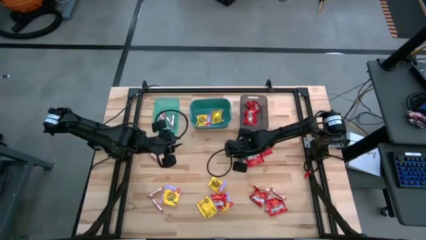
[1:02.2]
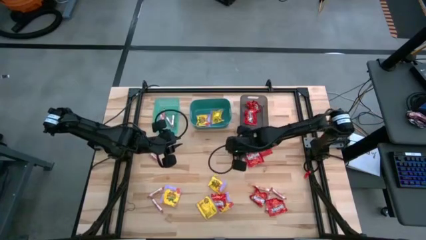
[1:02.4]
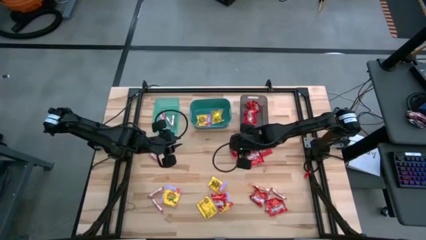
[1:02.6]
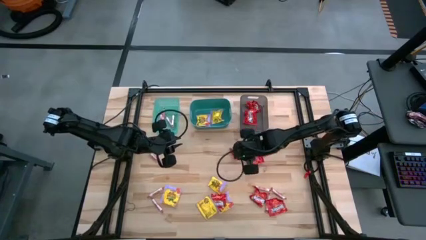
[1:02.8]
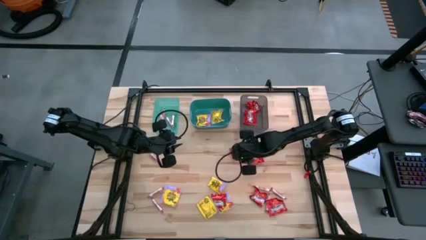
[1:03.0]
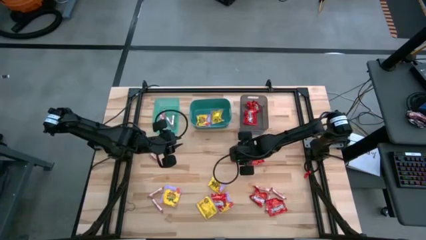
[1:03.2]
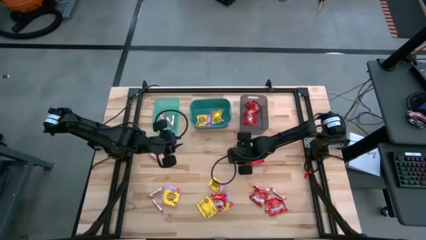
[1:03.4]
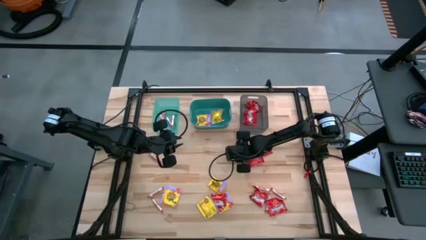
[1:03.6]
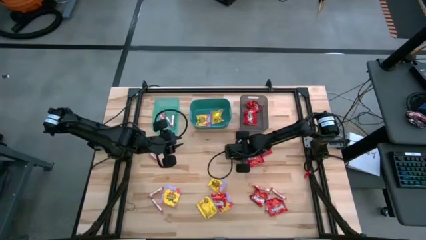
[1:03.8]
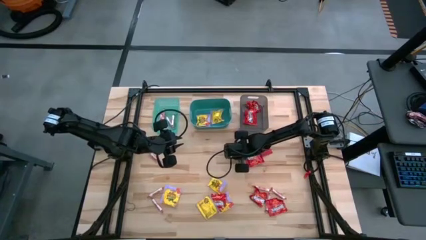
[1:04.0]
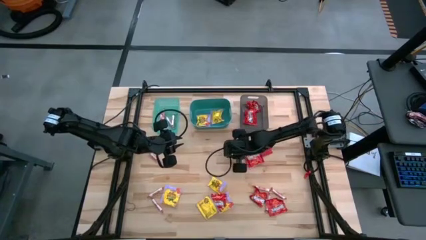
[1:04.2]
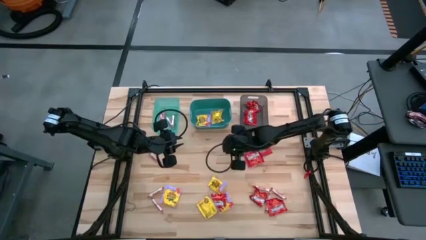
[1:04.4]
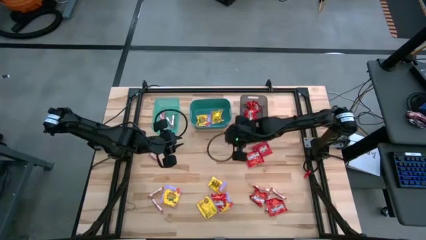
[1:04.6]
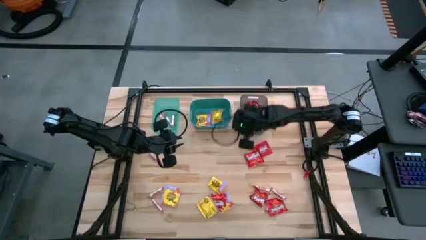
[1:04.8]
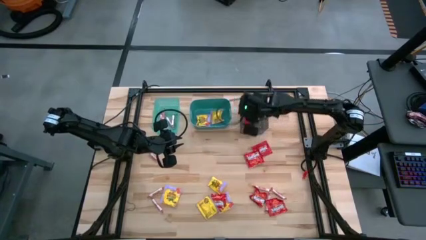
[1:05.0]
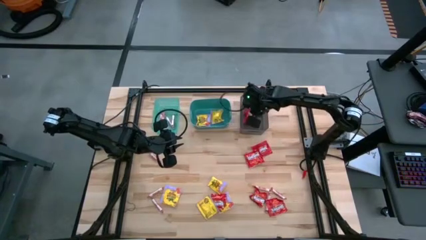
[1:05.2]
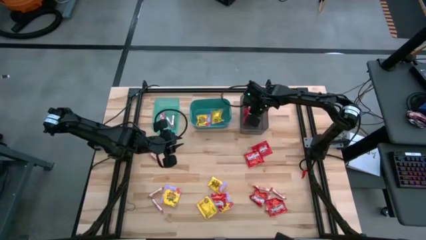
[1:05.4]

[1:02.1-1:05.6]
Task: Sort candy
Put the red candy into the black bin

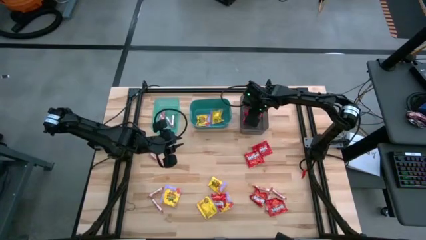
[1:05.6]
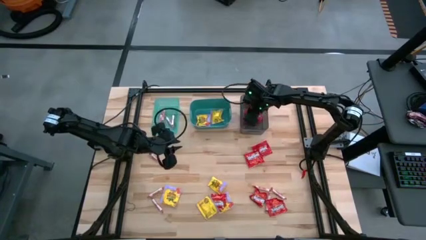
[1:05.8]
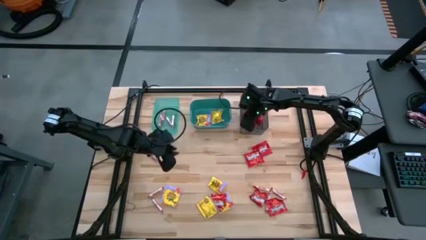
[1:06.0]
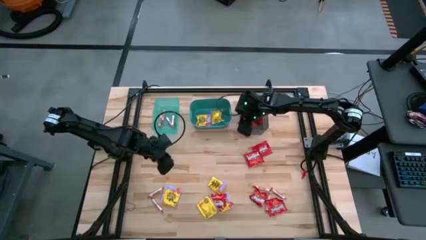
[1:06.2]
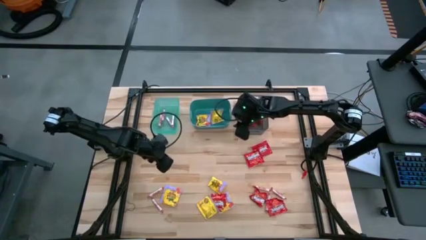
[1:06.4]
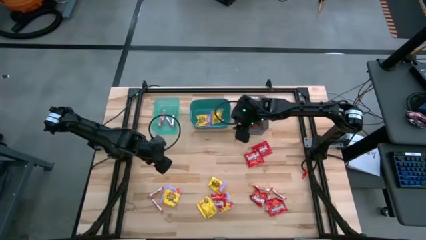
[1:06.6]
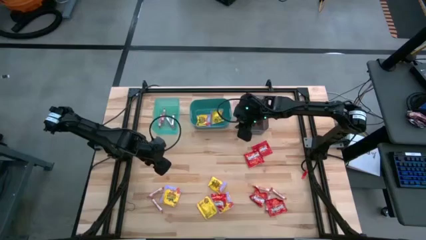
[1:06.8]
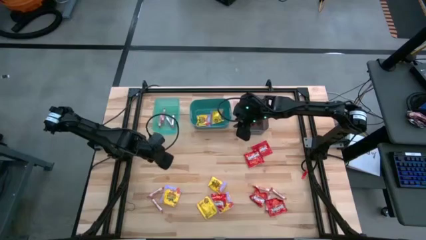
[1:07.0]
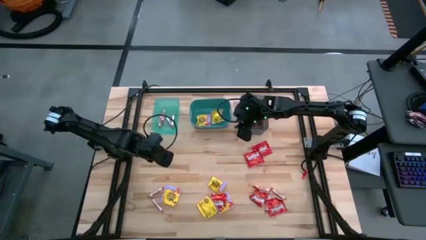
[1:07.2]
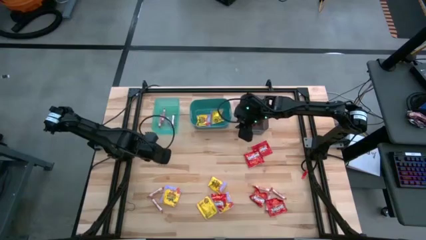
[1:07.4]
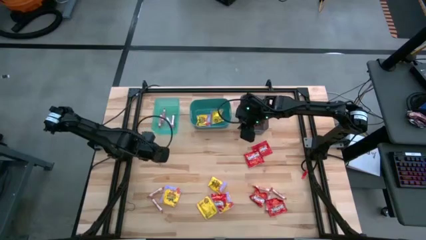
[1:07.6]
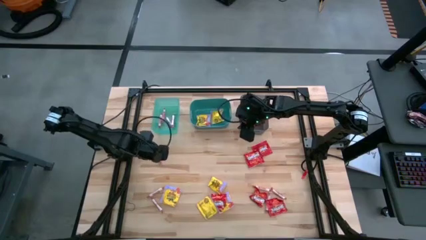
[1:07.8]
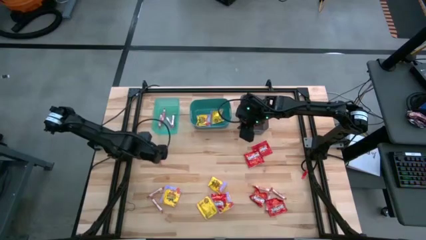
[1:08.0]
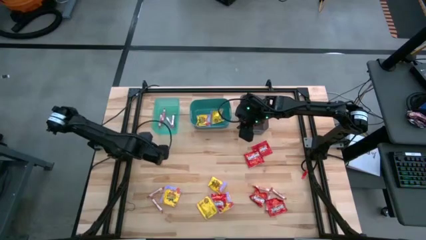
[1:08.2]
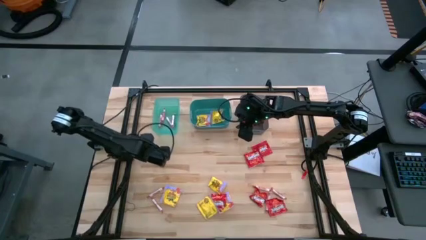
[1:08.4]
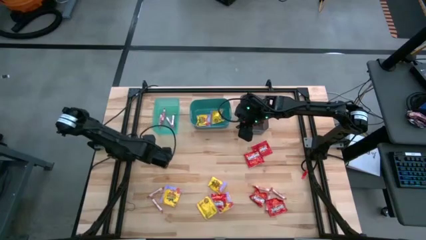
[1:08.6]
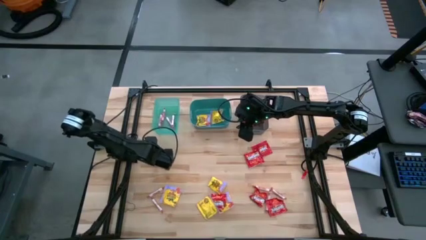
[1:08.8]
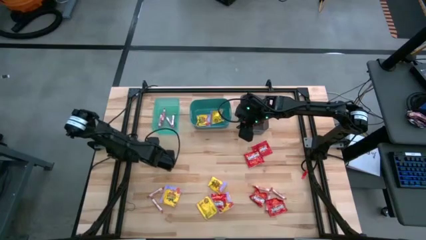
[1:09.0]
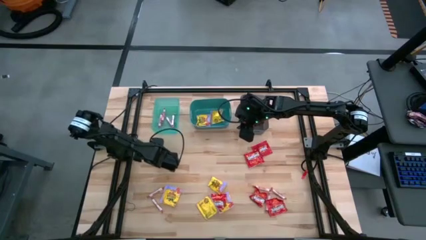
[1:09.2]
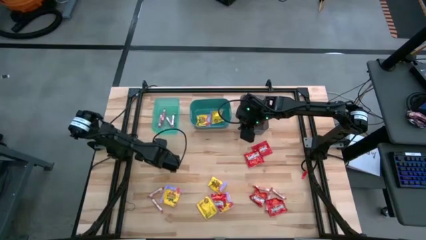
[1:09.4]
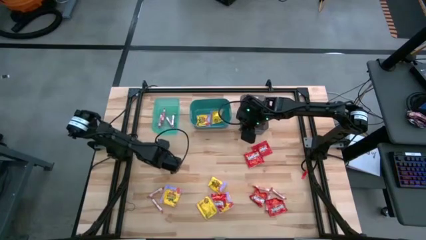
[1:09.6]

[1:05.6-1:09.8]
Put the white candy into the blue bin

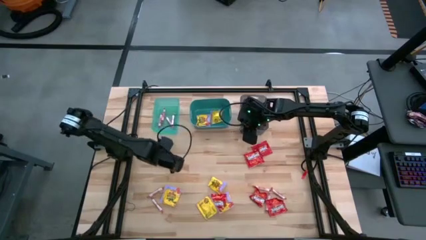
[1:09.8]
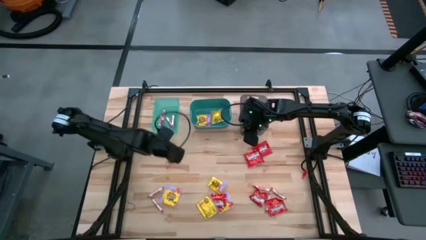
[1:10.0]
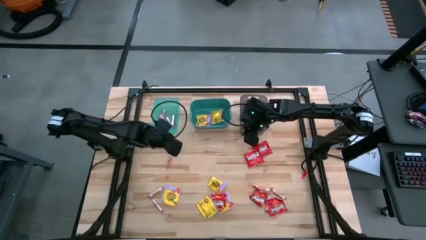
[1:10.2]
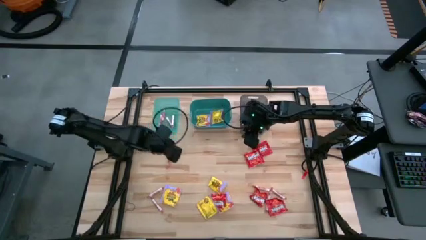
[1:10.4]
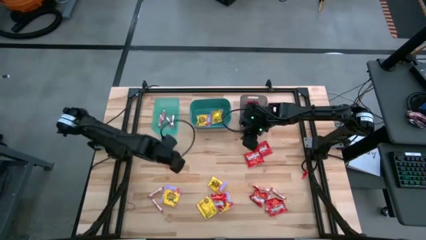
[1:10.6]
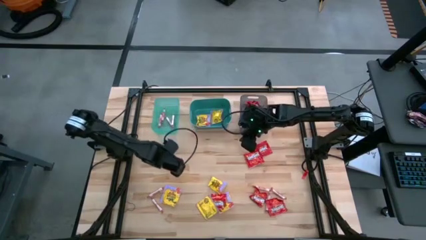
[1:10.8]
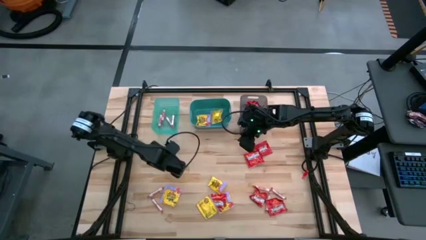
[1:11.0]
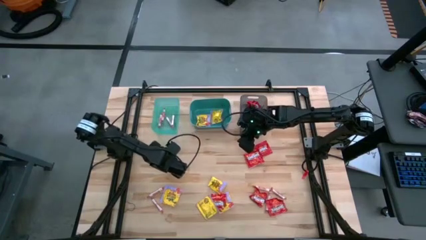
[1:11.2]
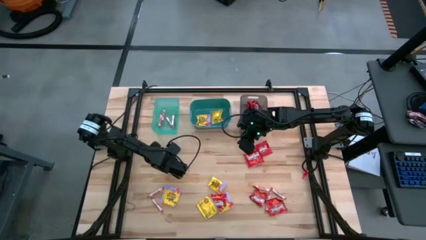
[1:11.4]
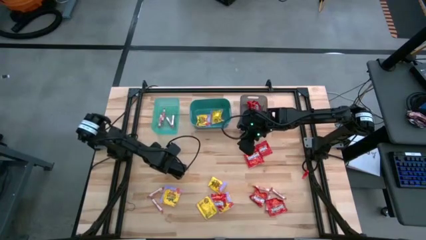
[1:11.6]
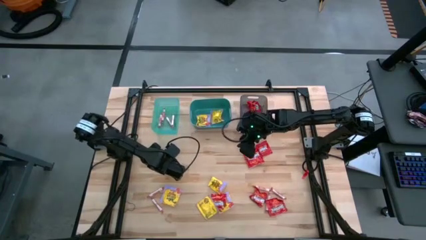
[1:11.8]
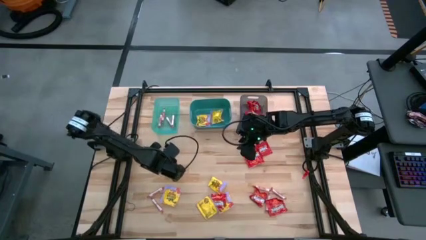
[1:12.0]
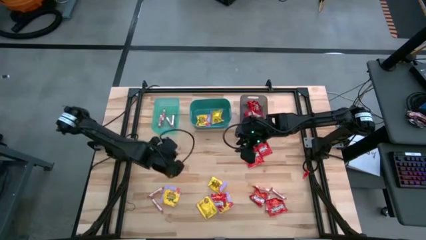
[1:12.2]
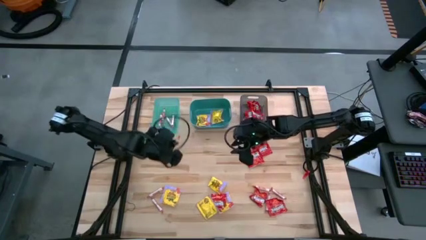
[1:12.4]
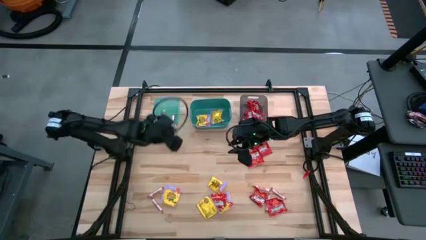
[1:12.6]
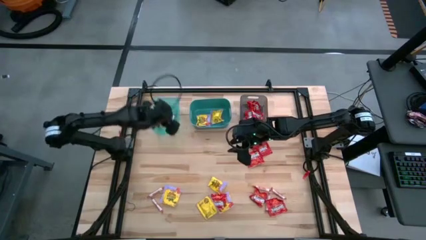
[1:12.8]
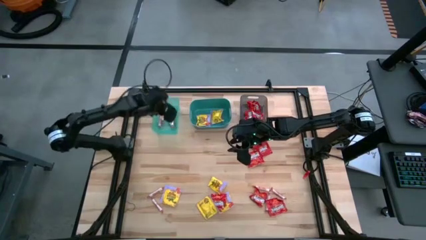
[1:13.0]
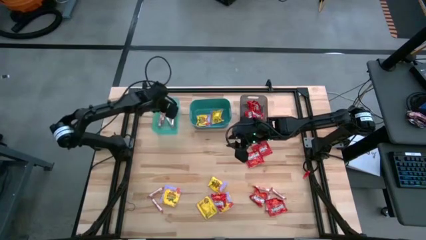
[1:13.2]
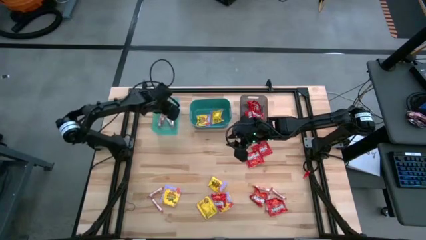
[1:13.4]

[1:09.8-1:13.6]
Put the white candy into the blue bin

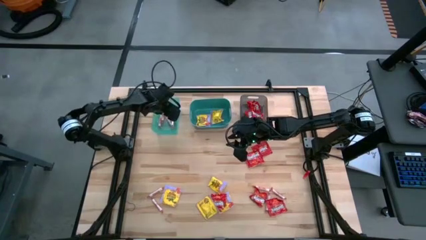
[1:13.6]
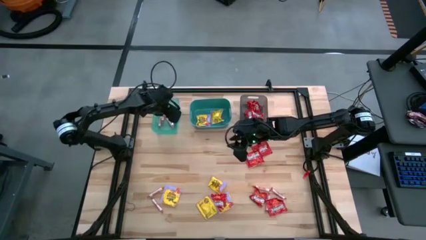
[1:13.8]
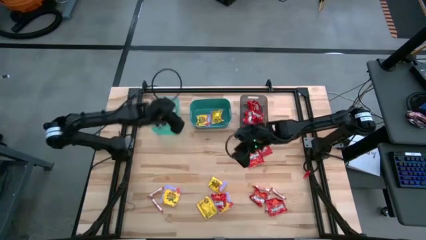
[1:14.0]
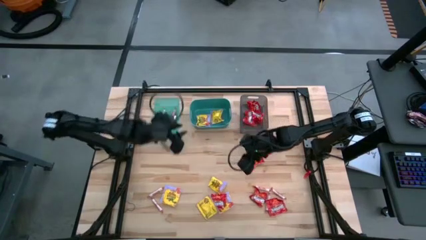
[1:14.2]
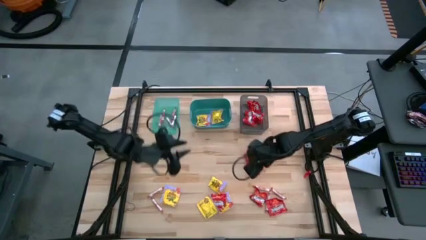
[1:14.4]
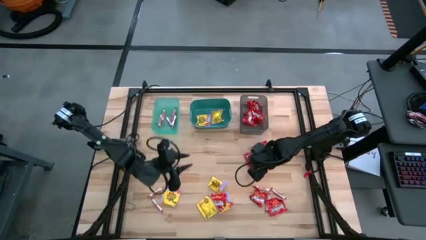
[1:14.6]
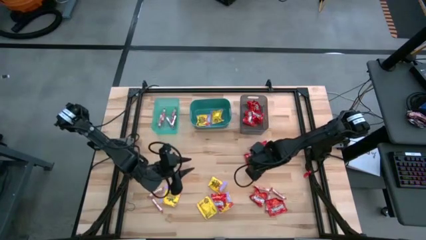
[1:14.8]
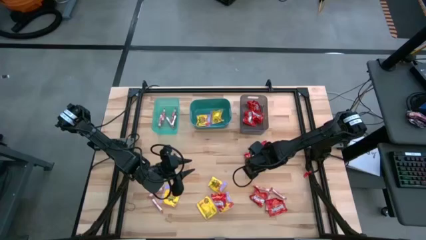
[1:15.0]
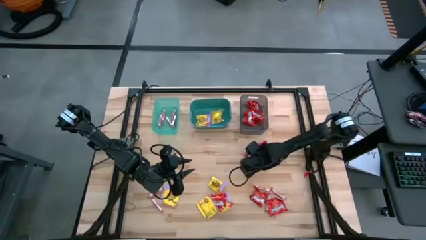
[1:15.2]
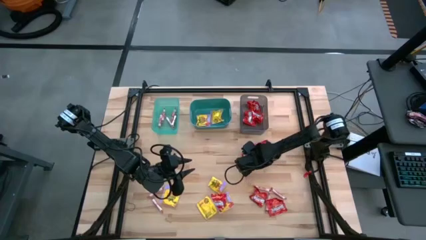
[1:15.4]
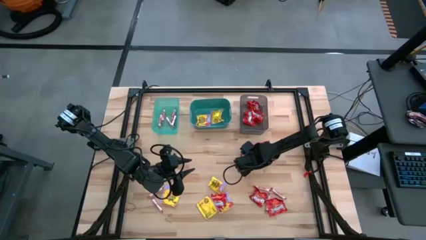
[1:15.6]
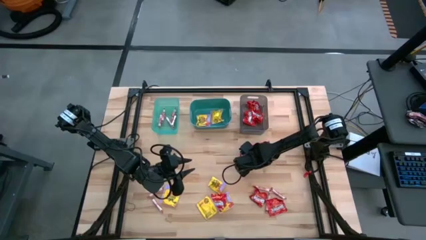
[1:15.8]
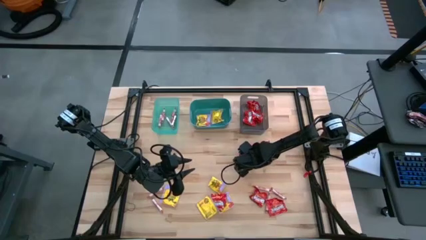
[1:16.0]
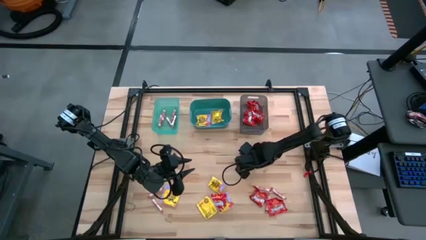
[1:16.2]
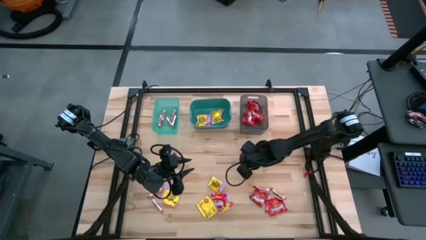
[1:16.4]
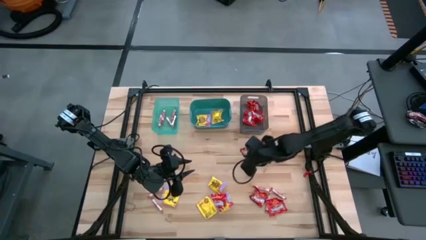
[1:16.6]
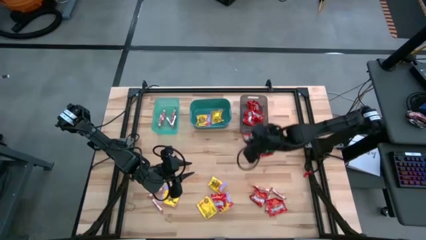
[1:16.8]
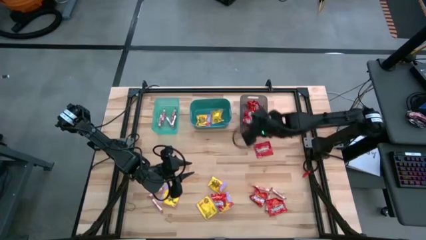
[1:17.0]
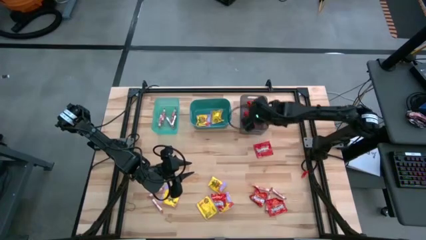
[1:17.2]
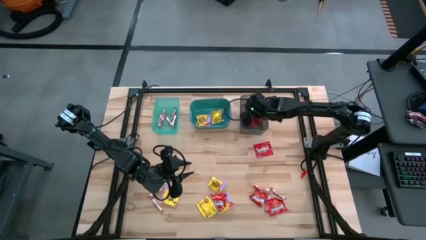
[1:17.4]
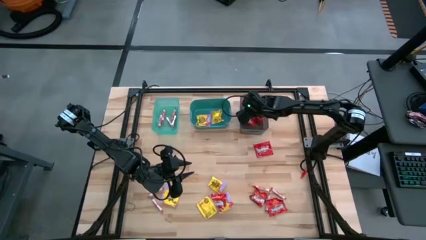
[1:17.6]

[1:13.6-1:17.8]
Put the red candy into the black bin

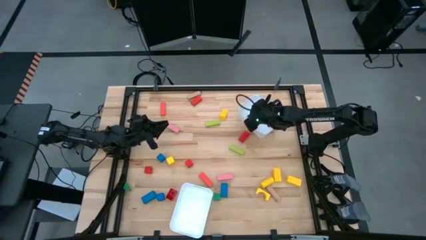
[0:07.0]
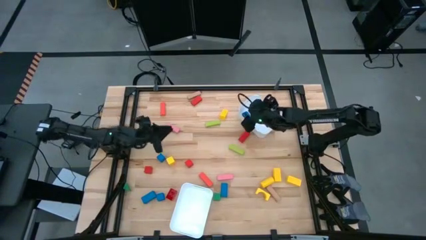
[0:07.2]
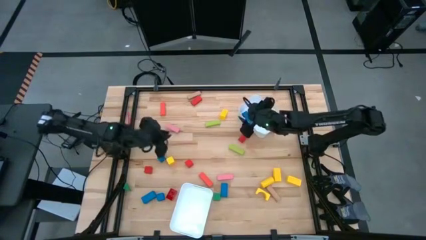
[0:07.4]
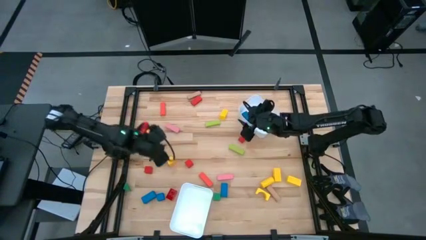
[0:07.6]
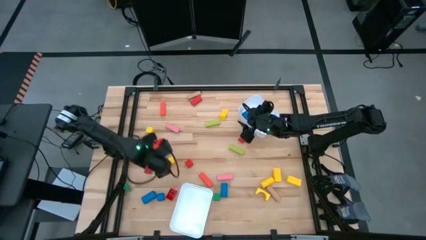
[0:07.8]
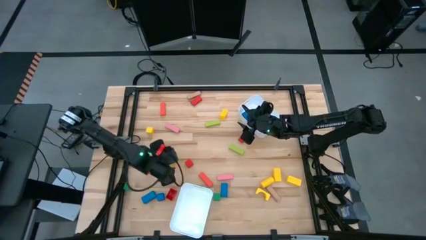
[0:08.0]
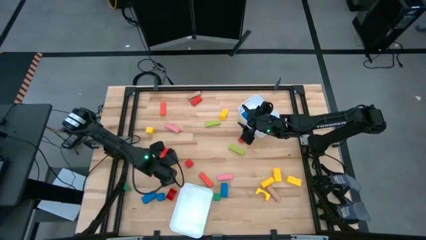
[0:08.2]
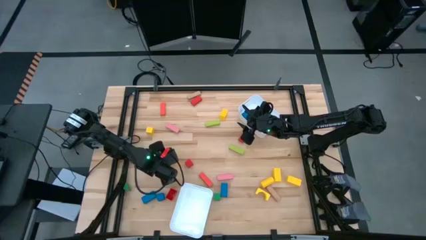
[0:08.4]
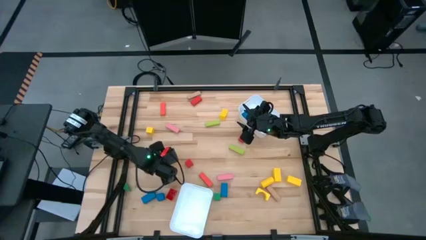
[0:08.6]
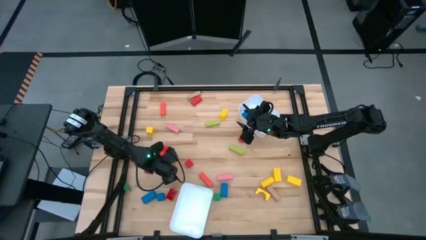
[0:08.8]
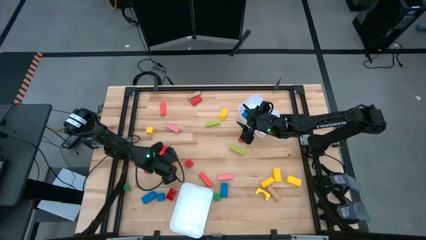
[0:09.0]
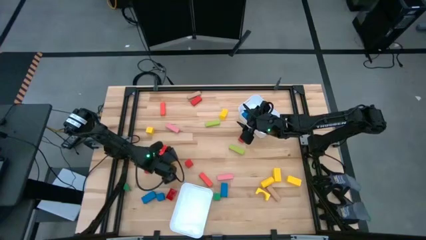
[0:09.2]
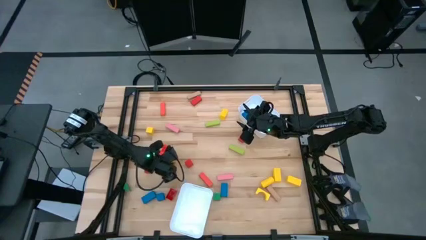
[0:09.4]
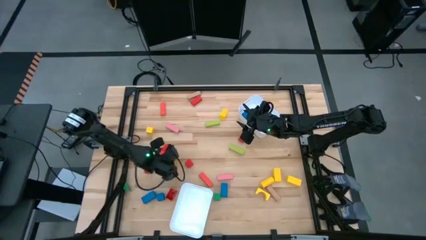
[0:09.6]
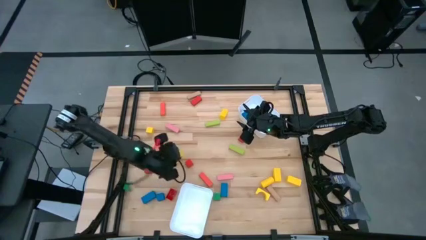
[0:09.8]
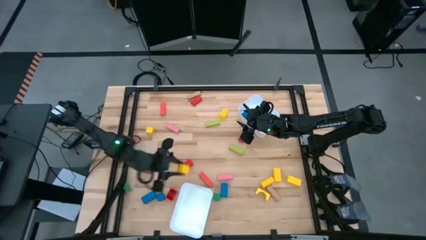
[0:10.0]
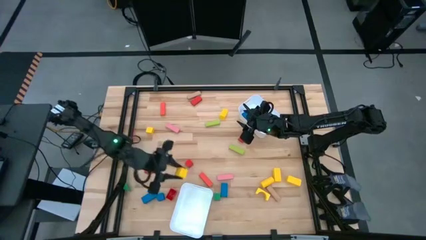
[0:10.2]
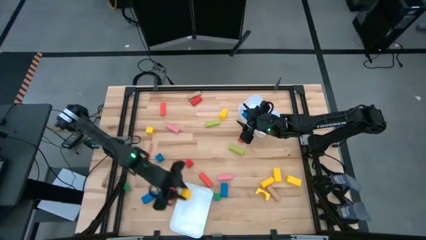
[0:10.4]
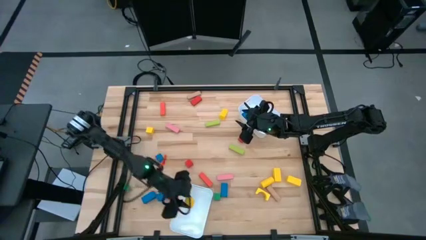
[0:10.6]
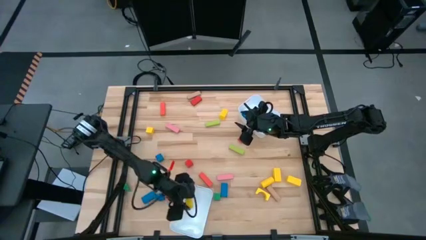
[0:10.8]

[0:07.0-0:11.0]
Task: Sort blocks by size
Put the yellow square block into the bottom white bin
